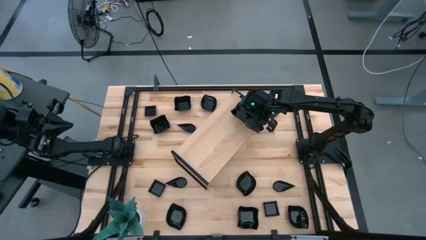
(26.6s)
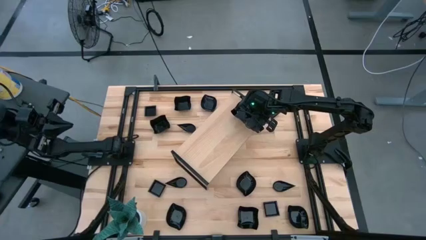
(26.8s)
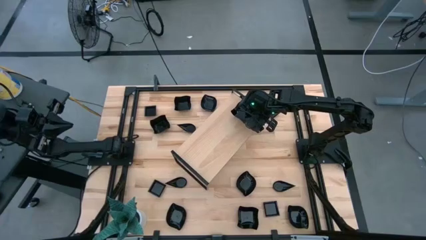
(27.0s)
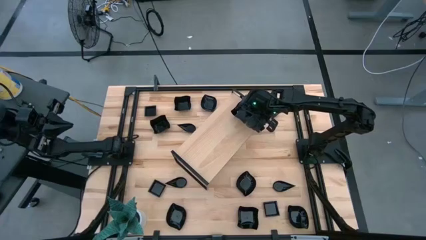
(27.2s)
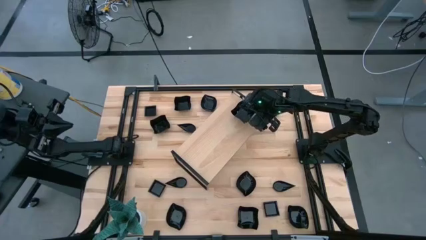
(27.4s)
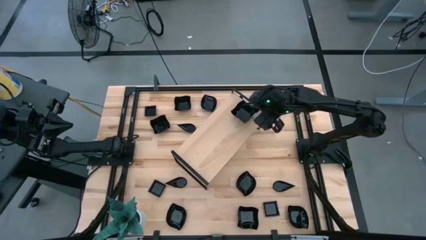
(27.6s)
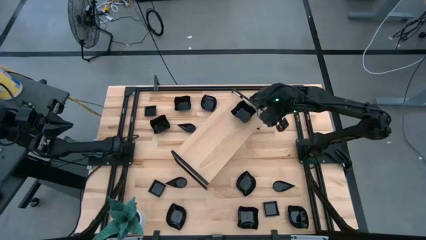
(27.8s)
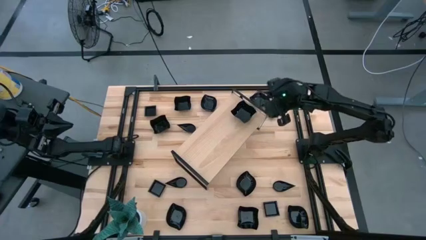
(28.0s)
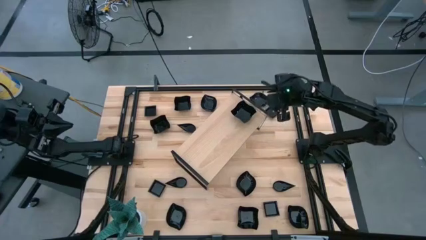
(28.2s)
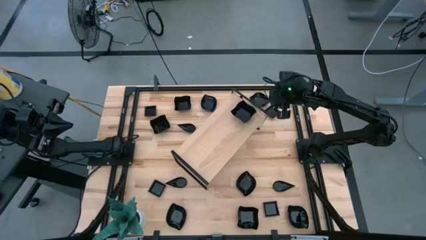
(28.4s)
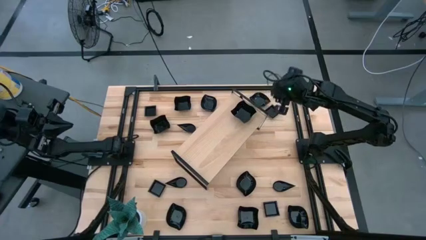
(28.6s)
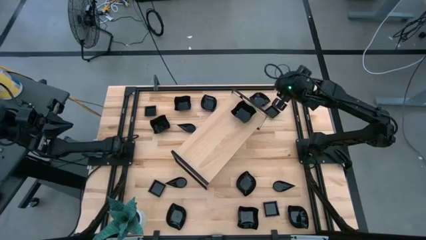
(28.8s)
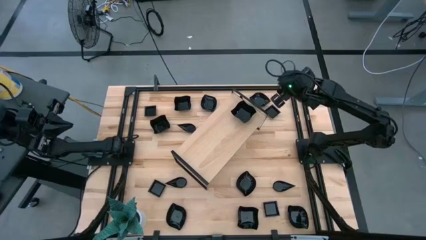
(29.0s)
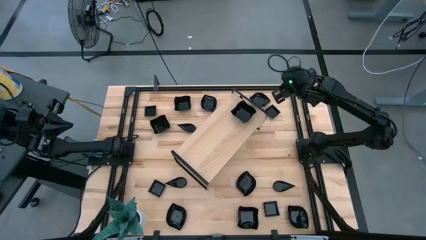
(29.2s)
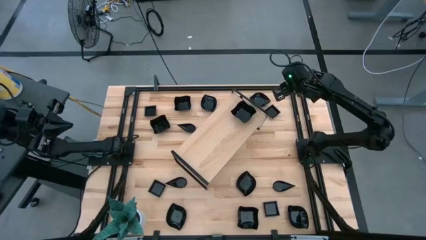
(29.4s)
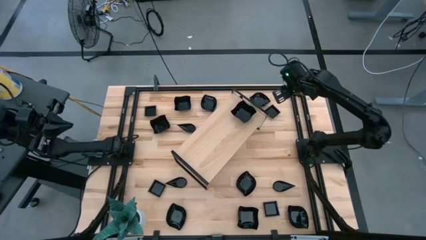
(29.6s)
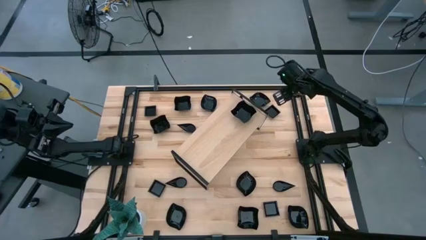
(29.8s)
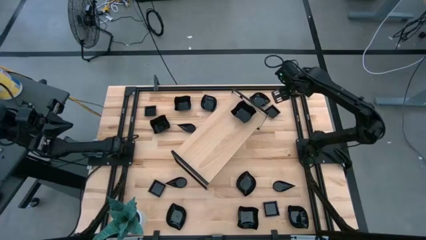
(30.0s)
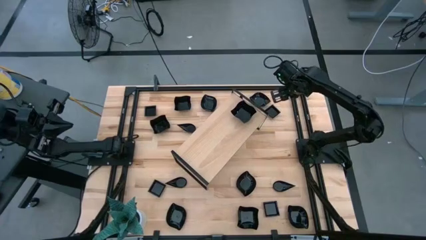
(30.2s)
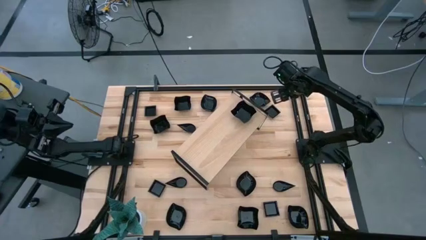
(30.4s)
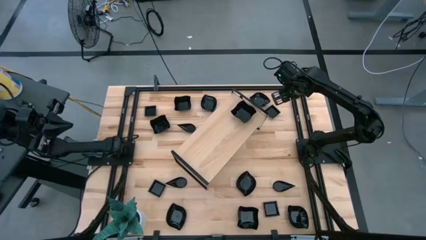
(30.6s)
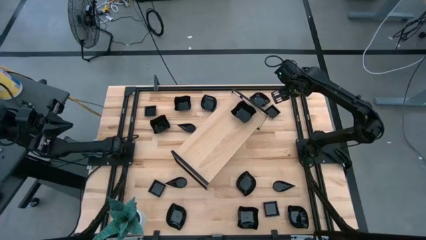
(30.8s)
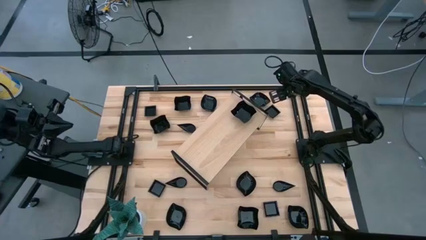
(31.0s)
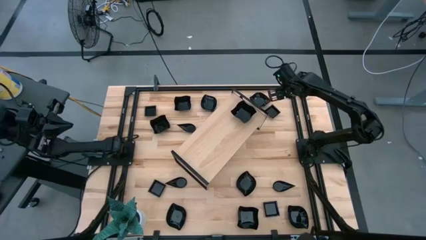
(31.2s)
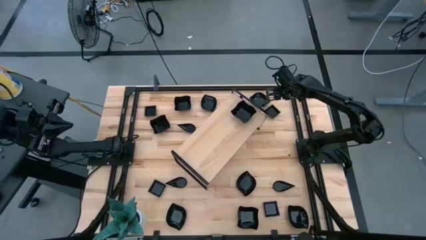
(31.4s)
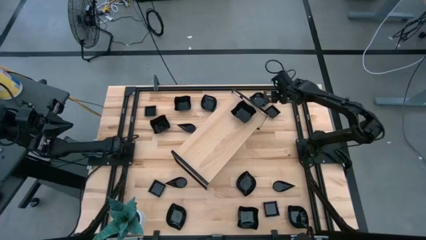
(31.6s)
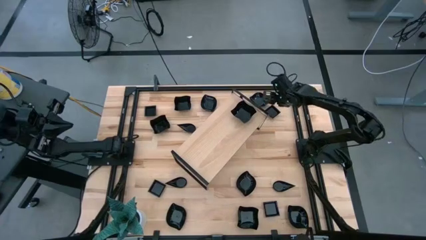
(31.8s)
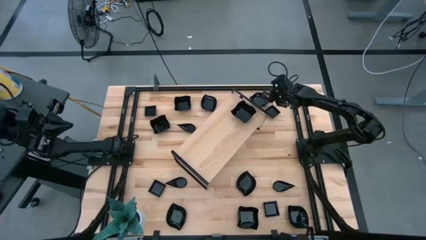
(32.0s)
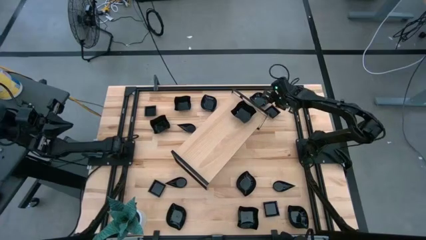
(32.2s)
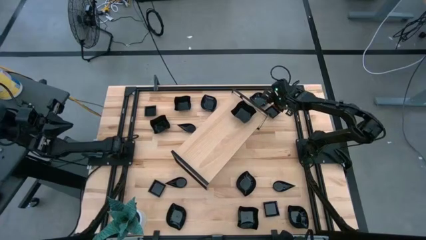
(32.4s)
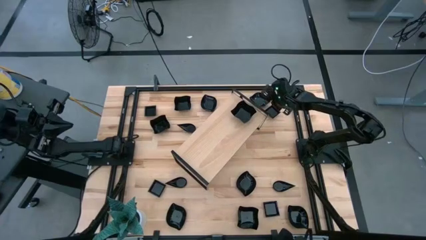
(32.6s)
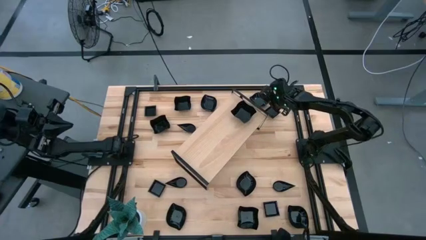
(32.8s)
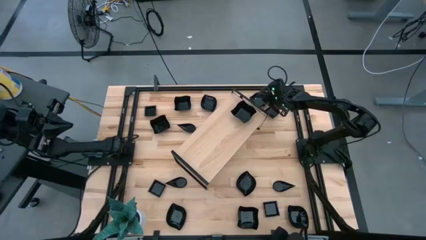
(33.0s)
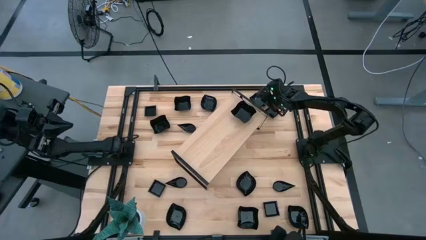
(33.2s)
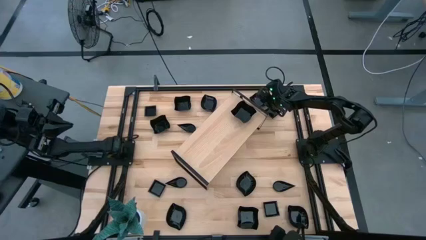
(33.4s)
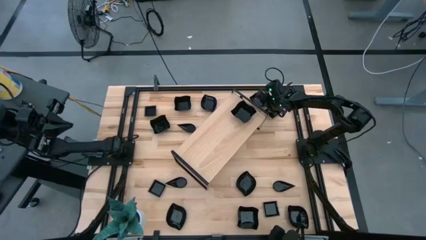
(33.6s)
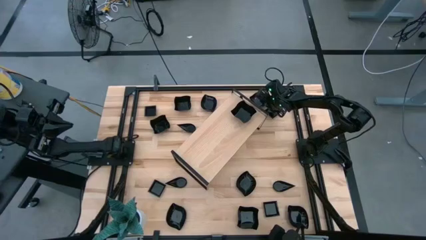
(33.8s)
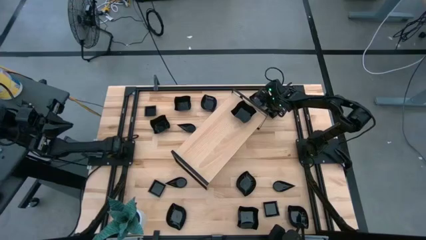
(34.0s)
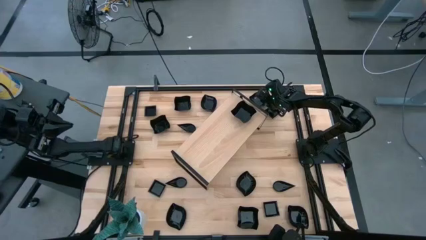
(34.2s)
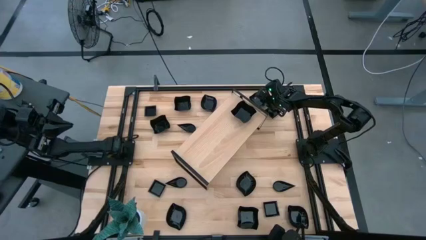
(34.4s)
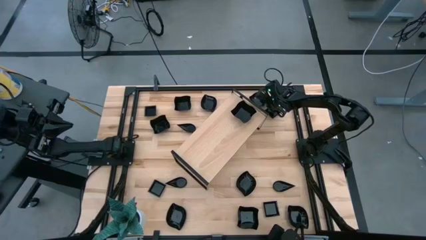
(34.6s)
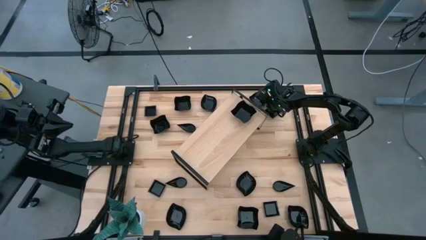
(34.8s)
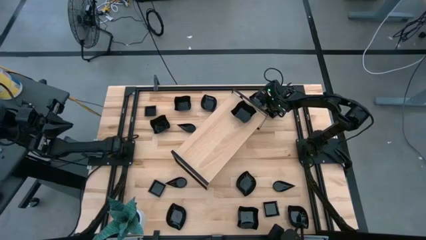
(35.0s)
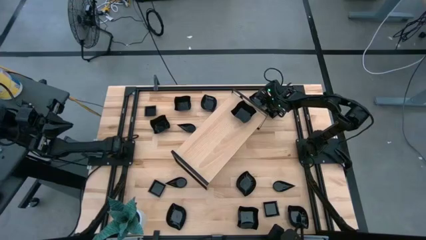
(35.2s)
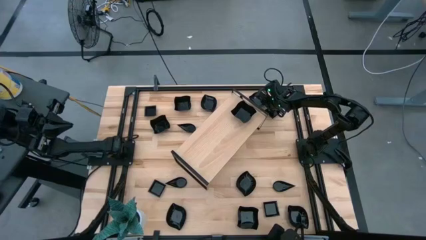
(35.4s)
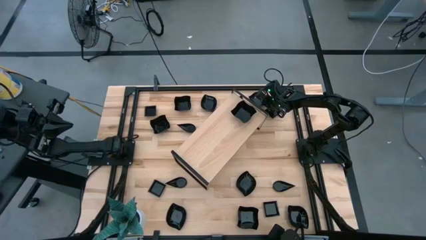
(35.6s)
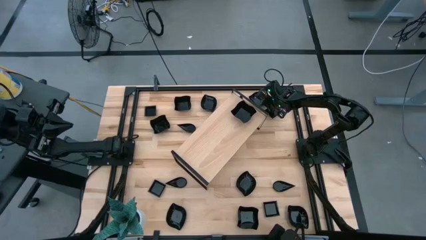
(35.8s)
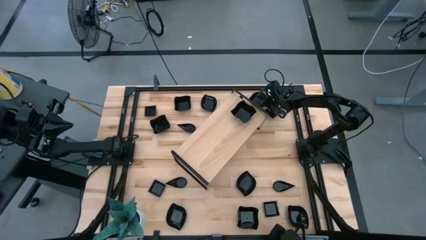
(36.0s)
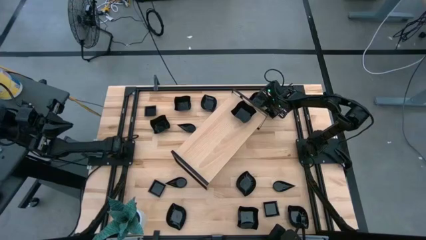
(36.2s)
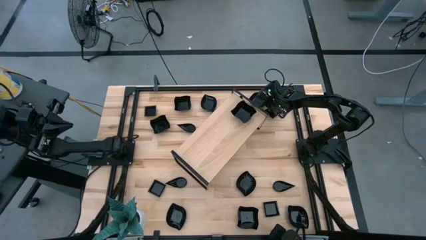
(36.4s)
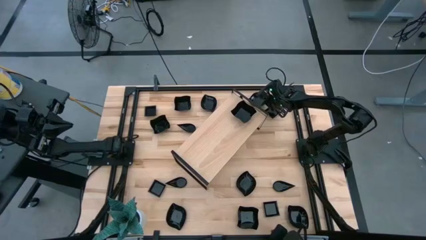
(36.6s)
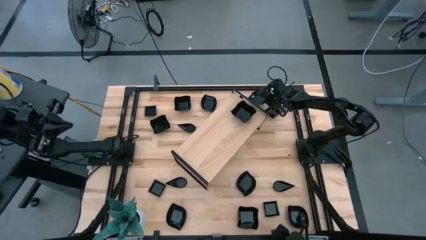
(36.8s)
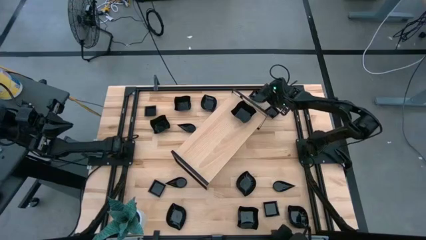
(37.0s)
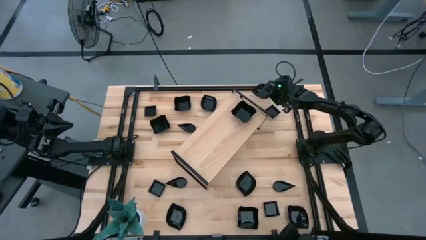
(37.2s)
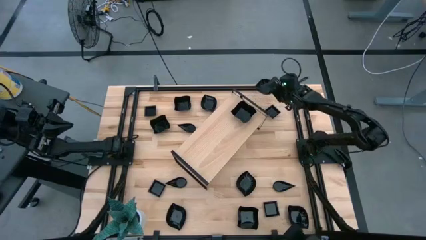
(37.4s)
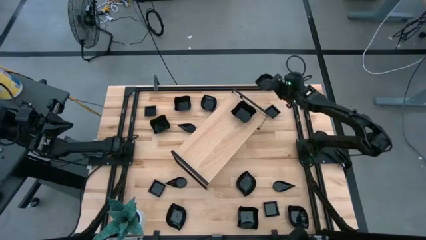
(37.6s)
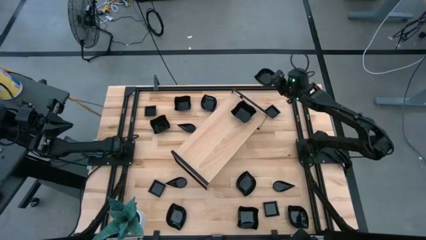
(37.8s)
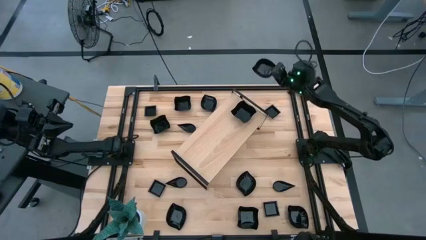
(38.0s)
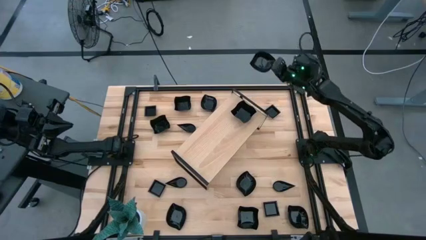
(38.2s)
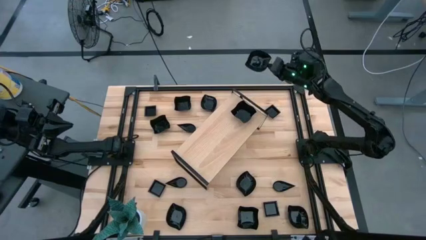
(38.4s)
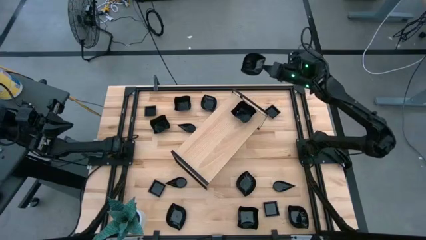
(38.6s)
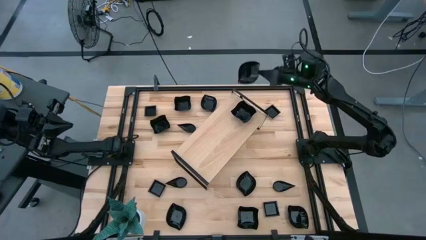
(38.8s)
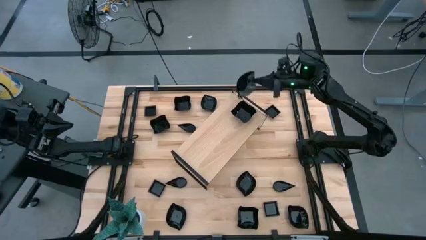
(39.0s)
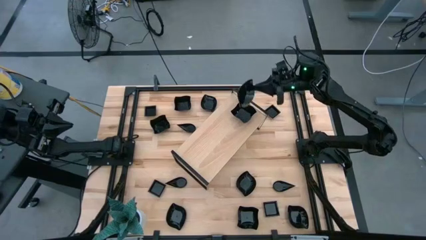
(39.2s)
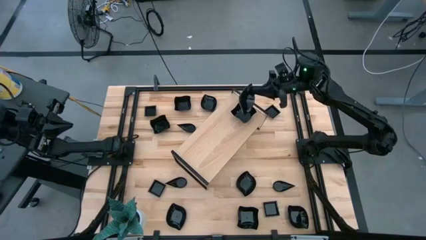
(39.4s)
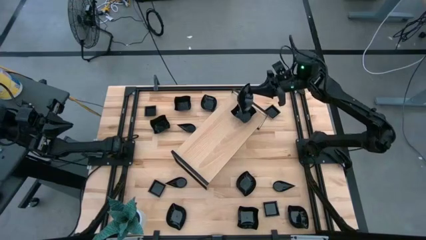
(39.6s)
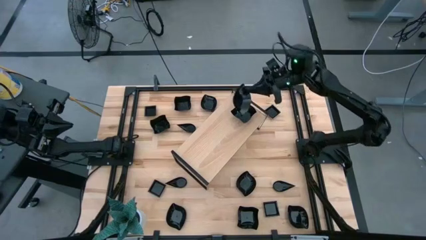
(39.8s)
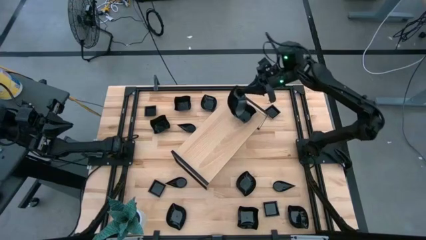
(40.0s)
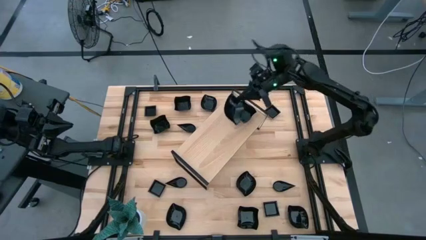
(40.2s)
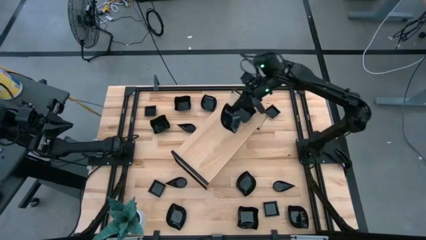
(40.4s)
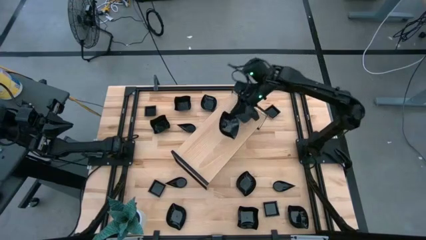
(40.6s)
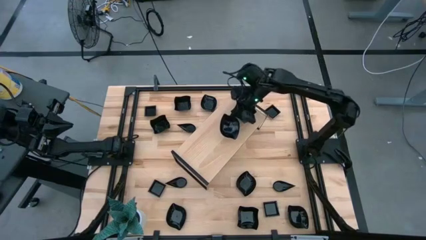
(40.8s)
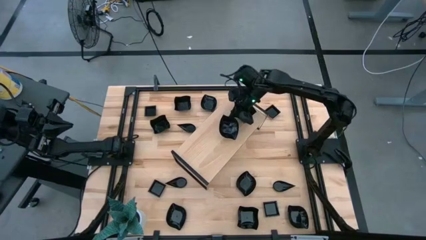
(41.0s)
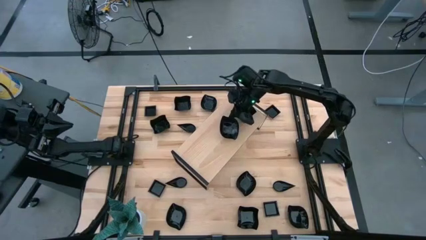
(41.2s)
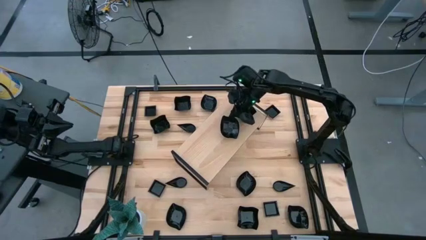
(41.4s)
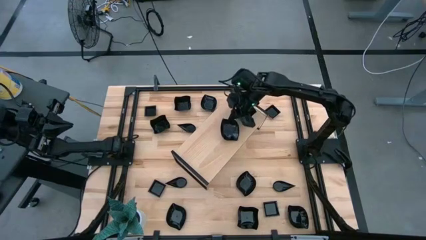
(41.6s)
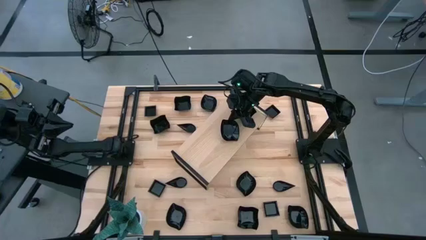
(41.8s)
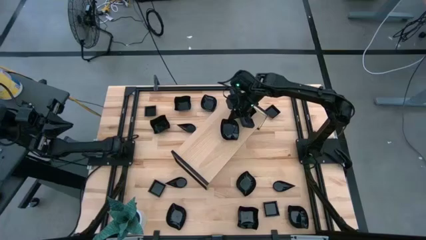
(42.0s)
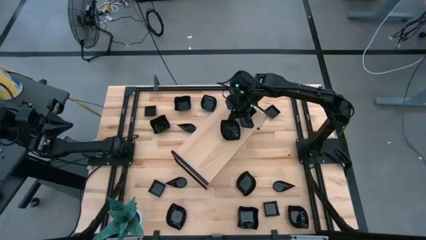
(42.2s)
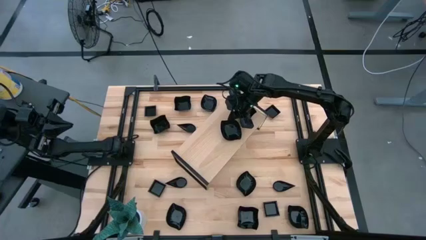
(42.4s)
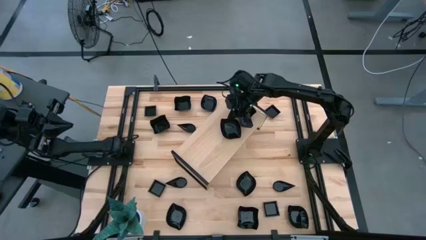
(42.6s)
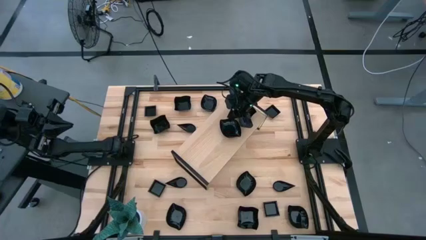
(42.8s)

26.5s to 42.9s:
Task: Pick & Place Mini shaped plates
Put the black leaf shaped bowl on the shelf
